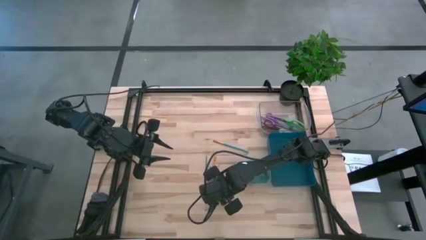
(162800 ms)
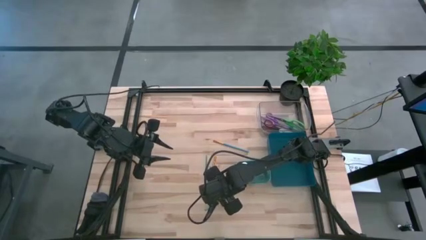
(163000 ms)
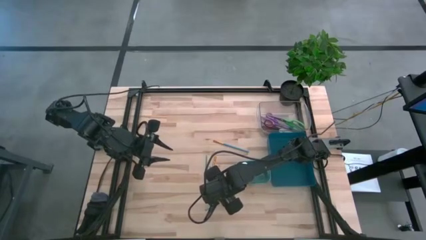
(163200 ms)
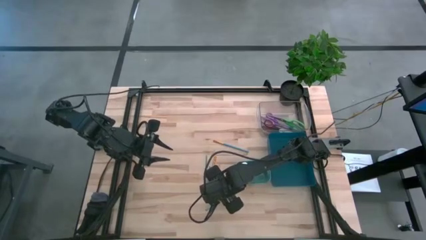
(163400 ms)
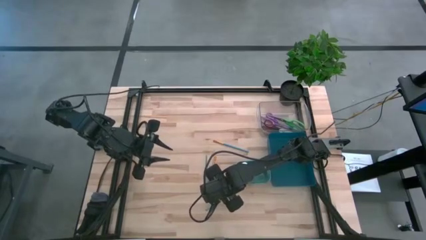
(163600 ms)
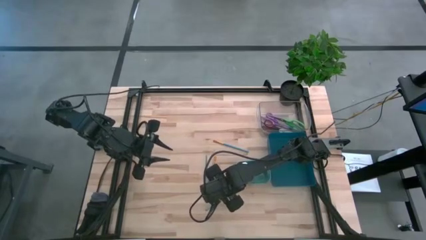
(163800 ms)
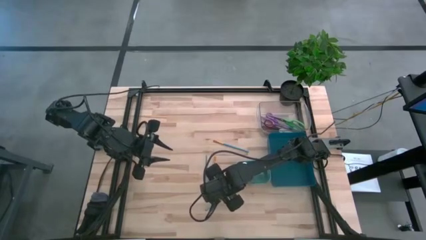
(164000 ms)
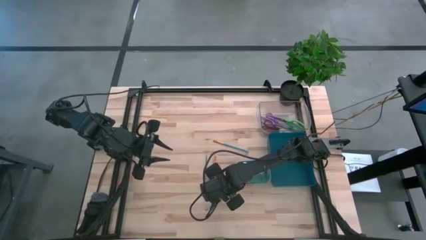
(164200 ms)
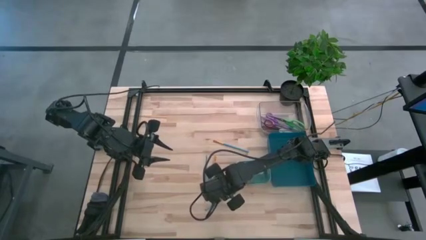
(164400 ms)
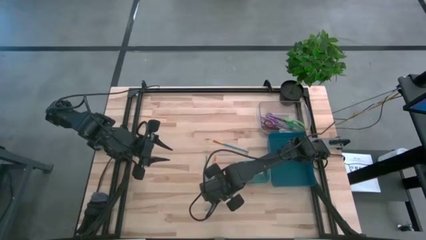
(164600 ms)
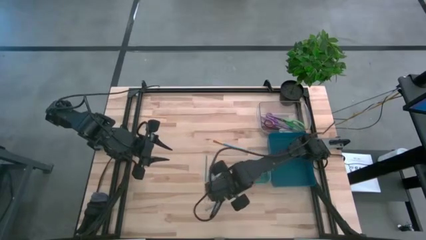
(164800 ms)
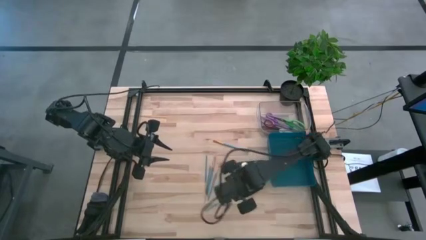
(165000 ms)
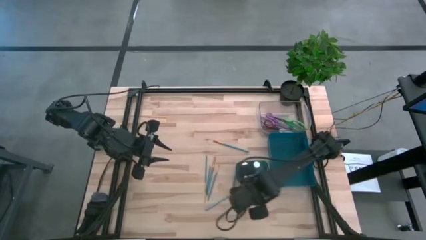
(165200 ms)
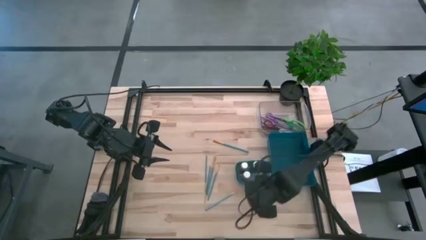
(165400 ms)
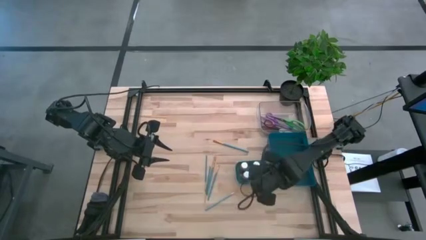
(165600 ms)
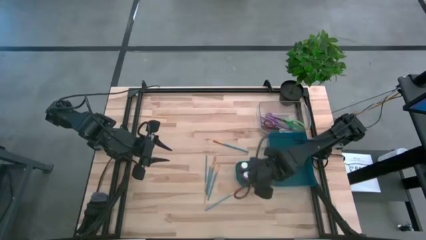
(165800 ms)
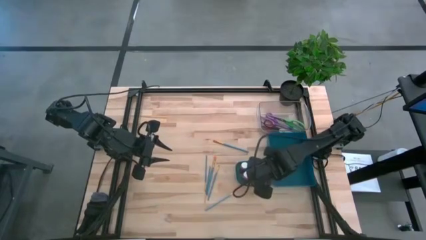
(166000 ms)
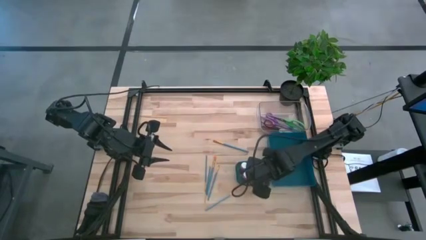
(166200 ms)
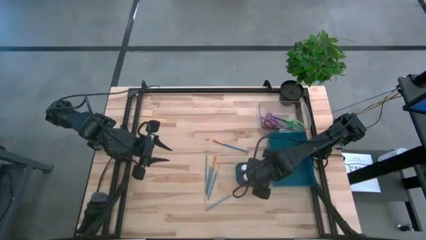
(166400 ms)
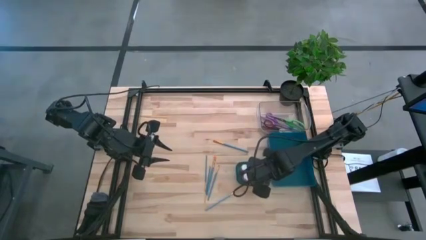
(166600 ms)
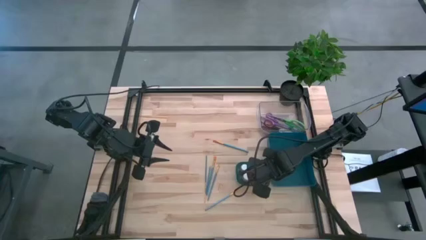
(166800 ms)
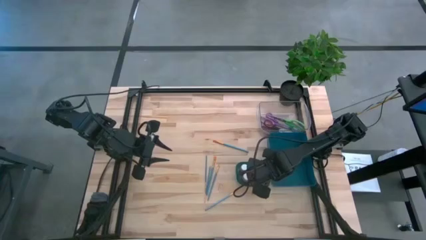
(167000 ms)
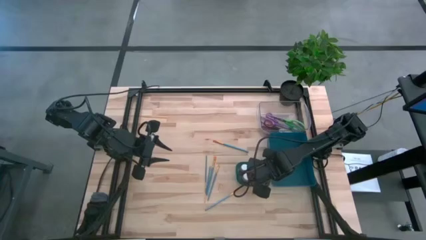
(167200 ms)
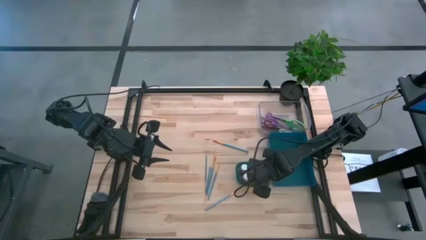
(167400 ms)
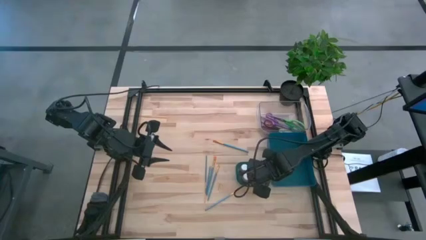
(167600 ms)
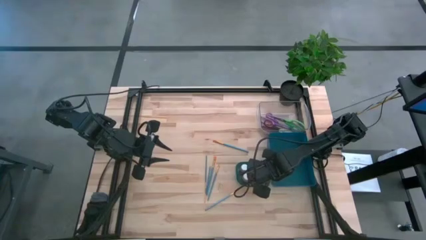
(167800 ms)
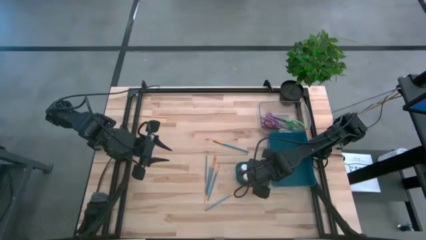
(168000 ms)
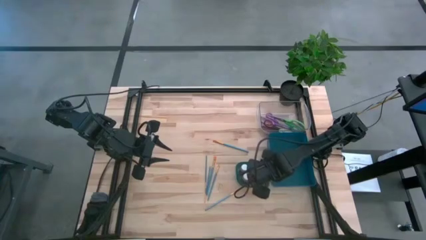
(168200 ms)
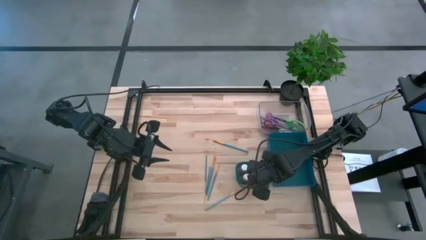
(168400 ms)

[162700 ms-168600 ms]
Task: Pick & Place Paint Supplies
Put the blue paint bottle into the green bin

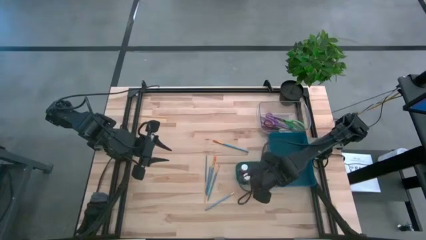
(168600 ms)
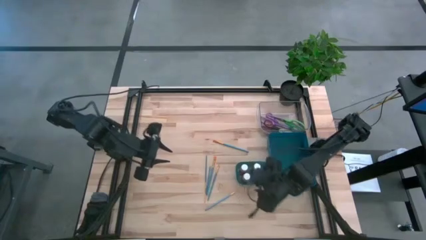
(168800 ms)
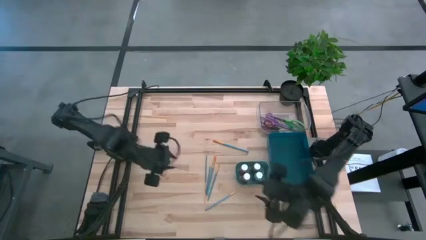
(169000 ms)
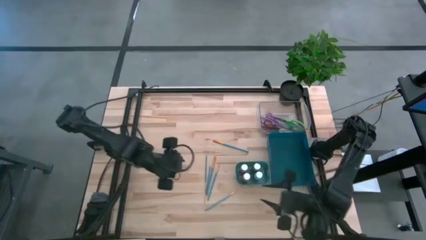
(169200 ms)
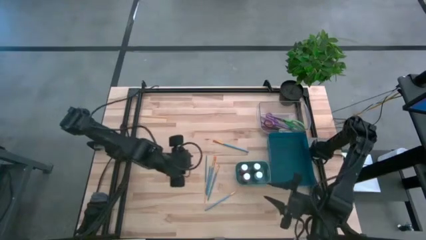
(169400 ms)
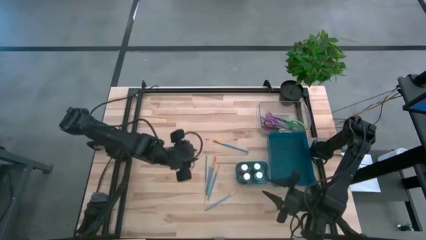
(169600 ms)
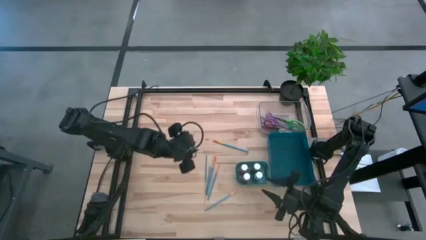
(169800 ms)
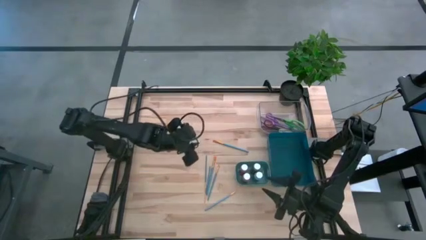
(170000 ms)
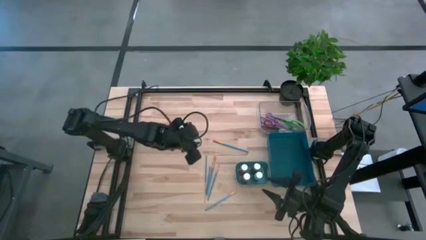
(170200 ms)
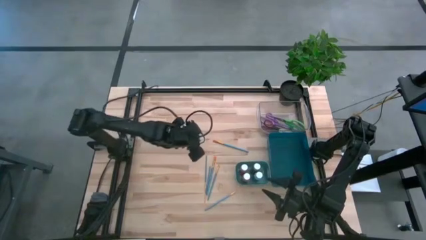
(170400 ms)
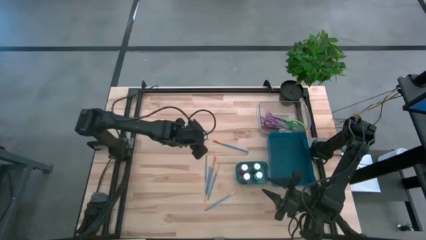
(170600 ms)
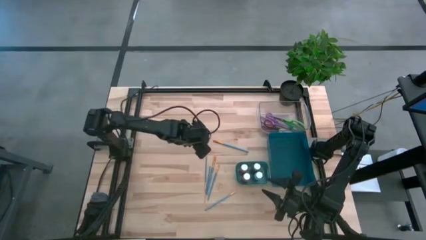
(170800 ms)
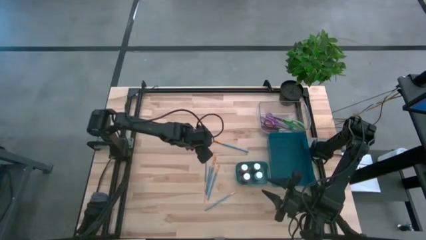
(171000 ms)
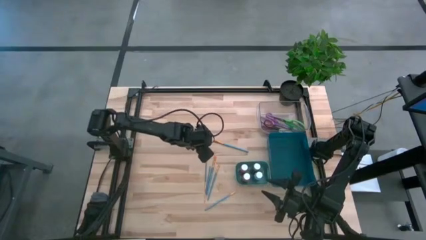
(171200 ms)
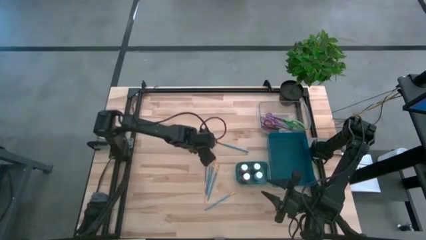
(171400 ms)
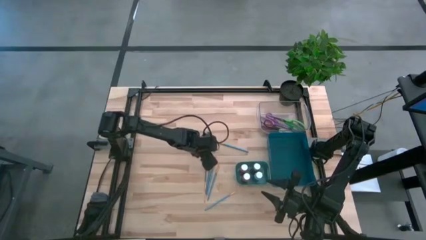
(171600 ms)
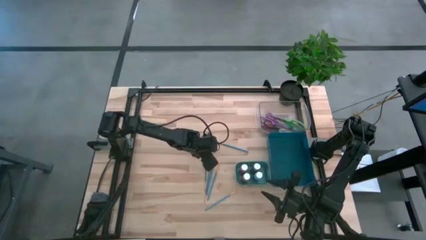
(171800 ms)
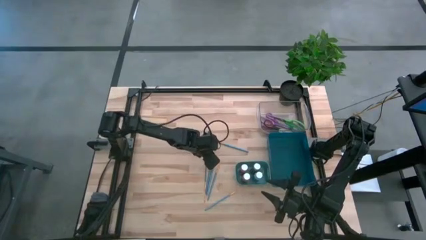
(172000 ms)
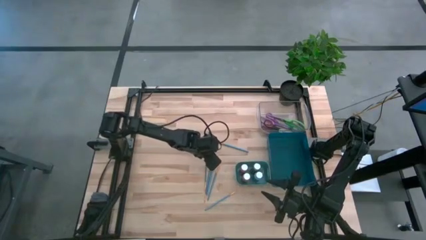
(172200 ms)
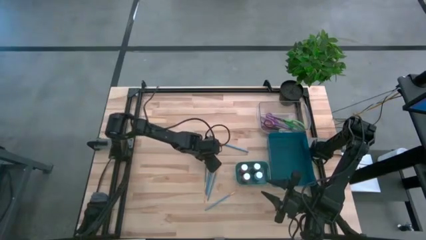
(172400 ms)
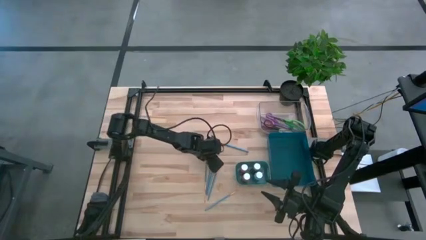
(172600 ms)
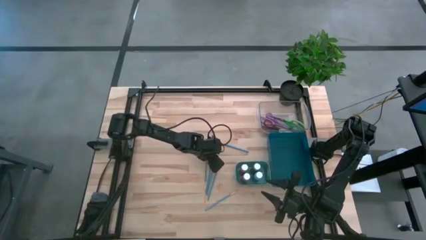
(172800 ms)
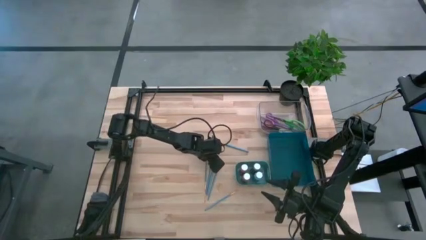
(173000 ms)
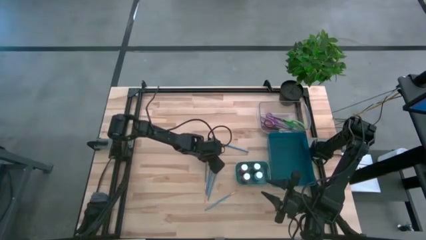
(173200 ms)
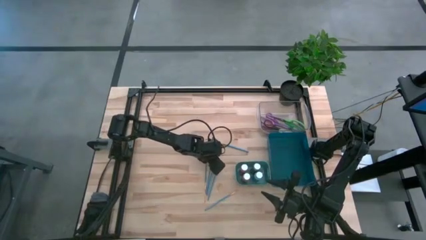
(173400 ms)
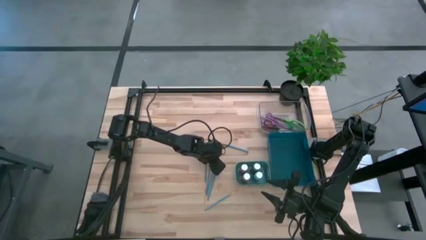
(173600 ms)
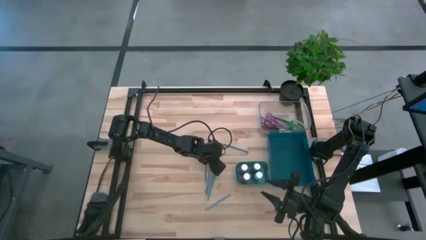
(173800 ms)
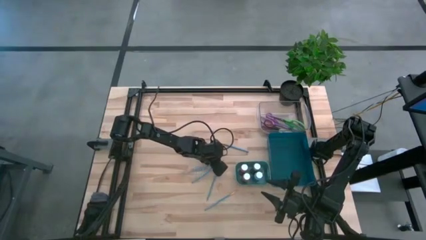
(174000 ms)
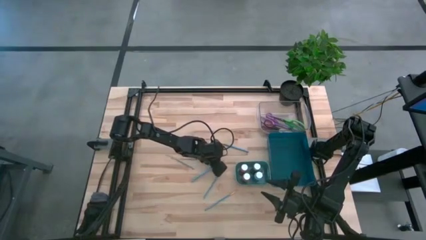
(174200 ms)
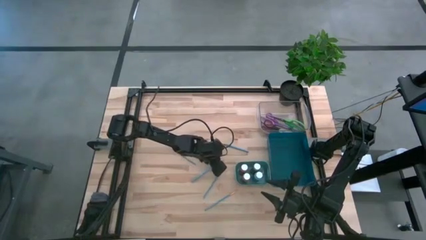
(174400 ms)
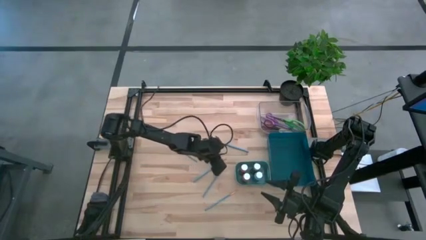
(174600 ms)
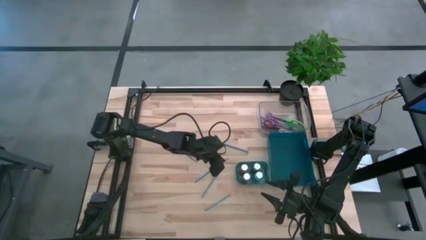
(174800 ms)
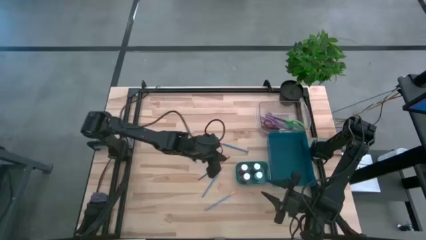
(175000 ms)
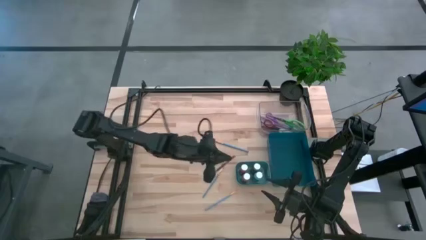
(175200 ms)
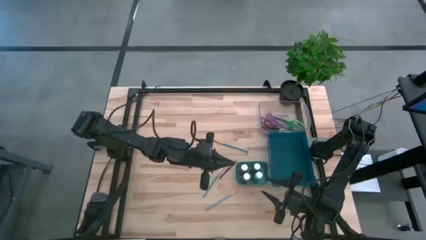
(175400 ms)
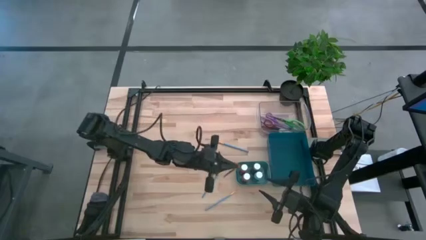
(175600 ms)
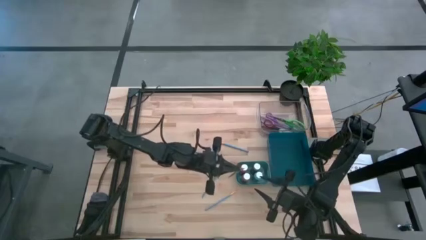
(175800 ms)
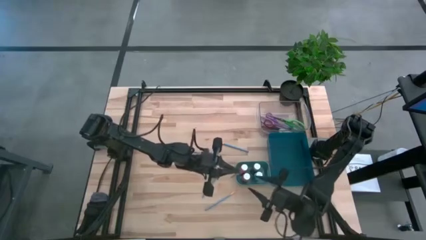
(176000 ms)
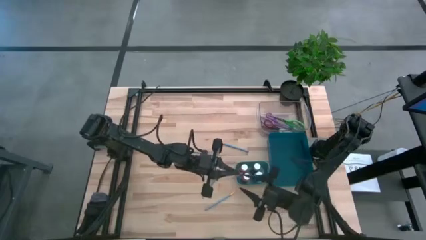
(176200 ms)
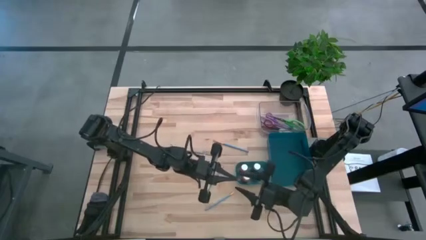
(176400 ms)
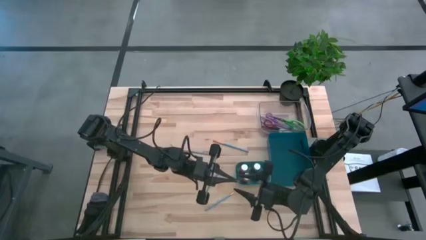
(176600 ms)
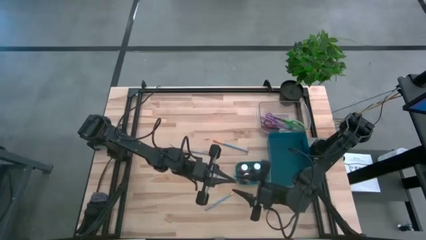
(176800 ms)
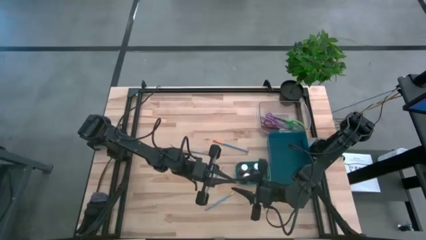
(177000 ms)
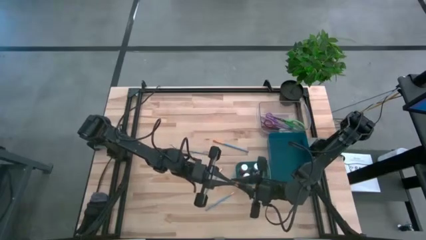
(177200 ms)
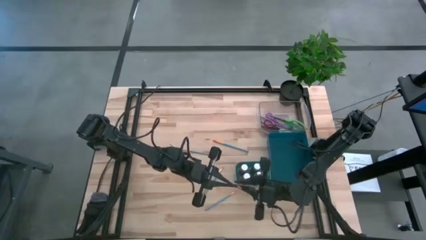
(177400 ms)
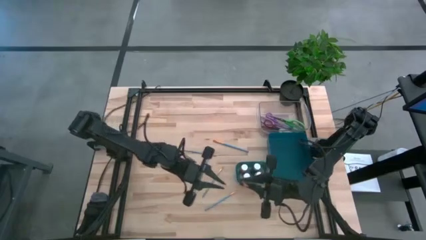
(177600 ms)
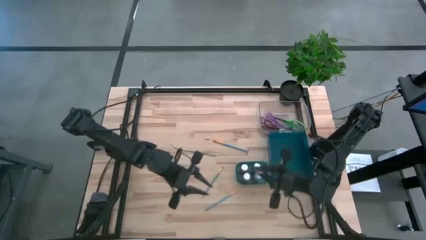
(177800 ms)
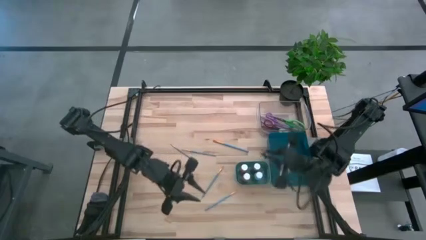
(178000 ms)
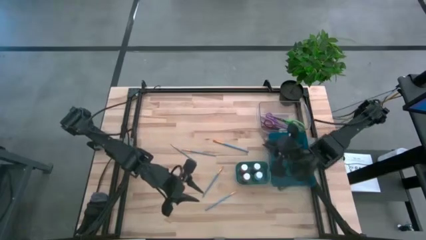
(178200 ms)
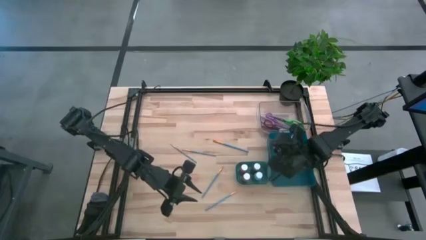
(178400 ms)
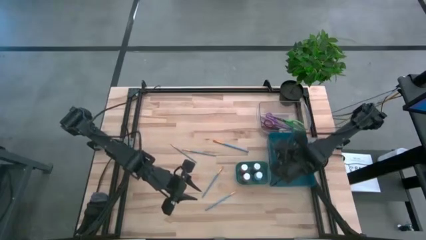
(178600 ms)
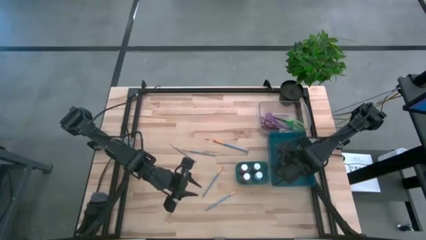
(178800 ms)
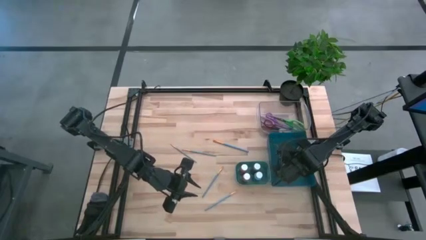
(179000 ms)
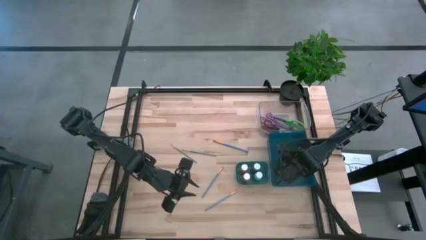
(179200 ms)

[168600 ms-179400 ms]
Put the blue paintbrush into the blue bin

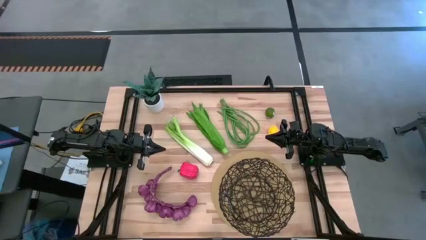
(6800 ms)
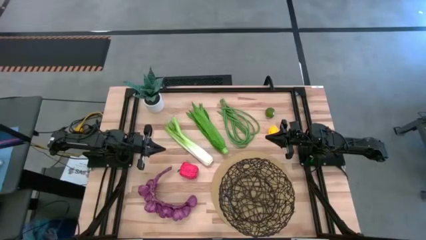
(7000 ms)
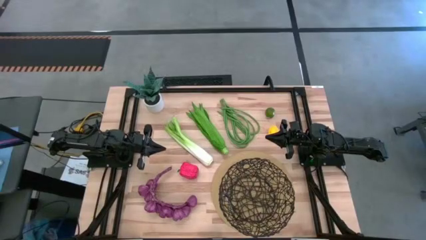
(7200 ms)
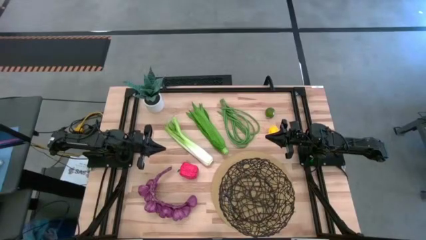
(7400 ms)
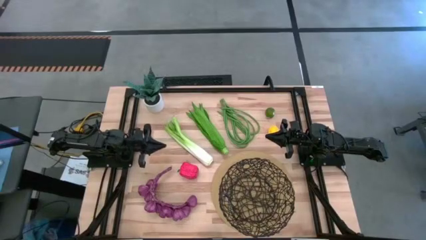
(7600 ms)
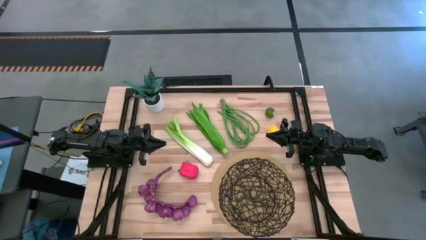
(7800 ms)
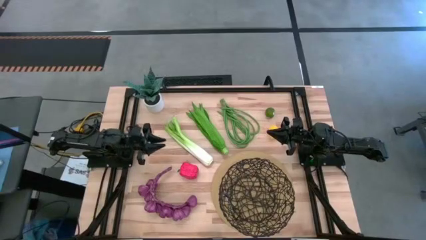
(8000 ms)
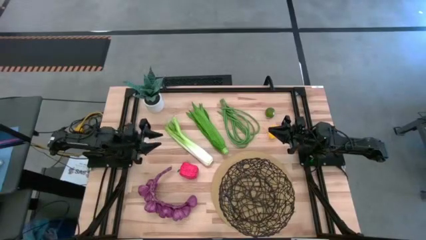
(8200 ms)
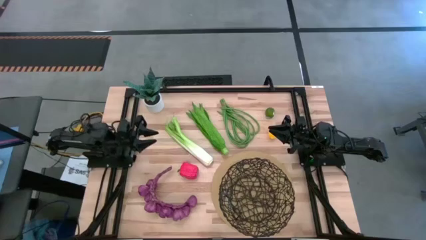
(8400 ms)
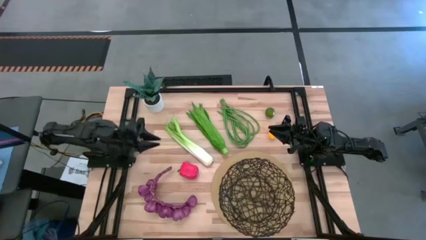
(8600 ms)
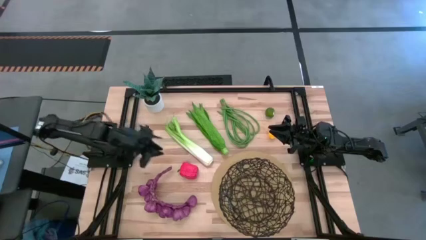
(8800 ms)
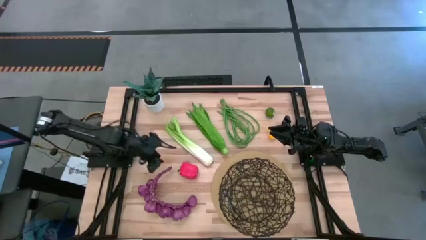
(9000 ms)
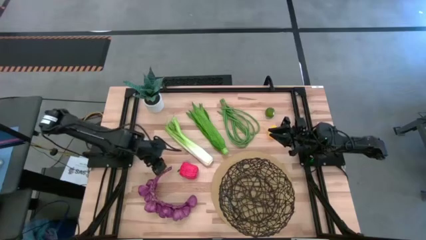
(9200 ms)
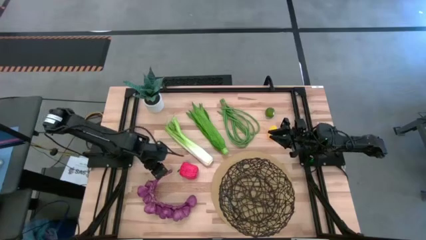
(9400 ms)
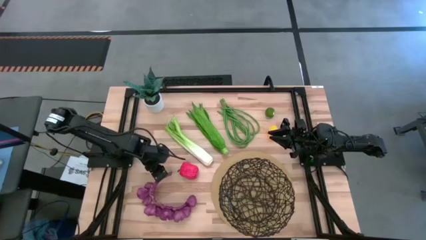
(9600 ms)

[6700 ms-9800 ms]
Task: Build produce basket
Put the purple garlic into the black basket
